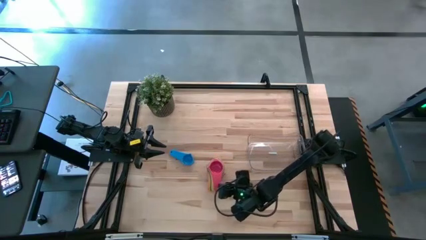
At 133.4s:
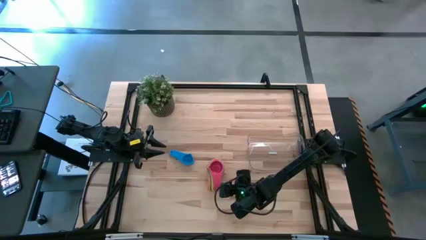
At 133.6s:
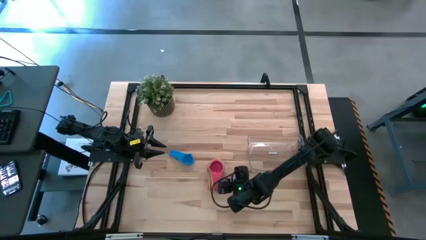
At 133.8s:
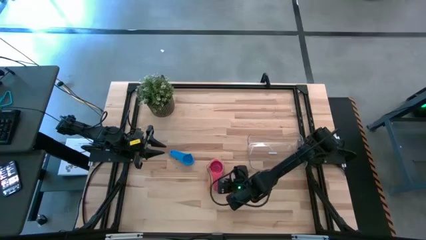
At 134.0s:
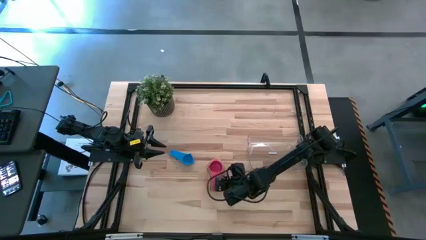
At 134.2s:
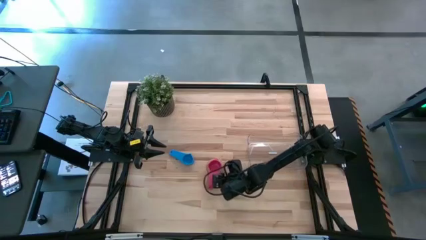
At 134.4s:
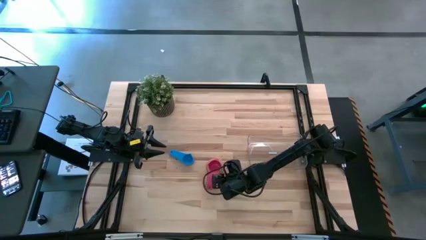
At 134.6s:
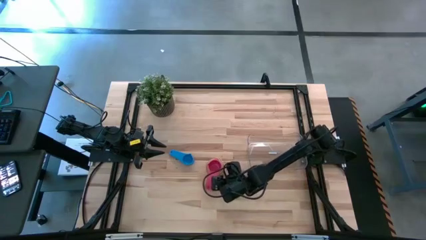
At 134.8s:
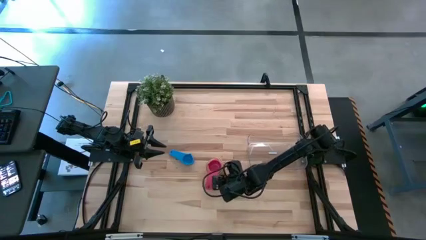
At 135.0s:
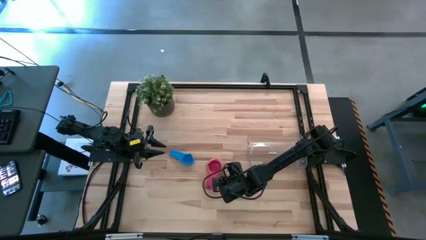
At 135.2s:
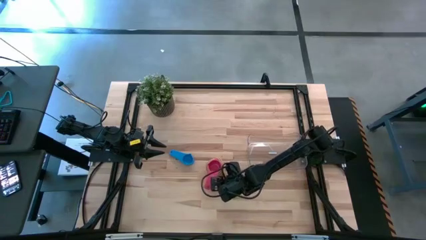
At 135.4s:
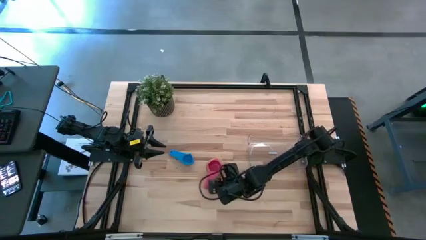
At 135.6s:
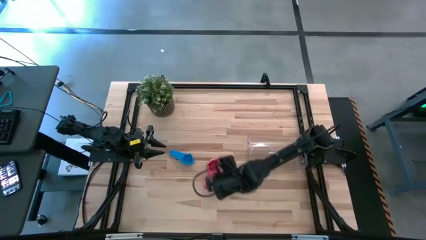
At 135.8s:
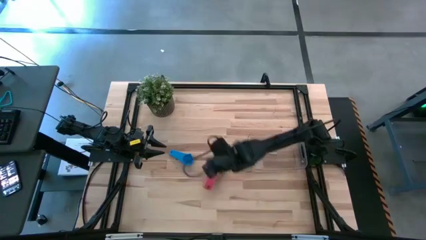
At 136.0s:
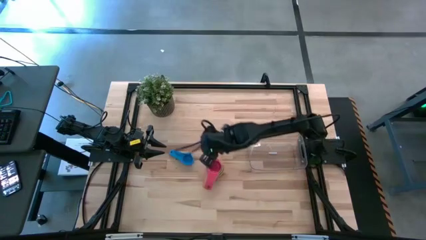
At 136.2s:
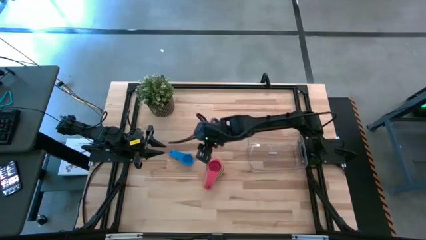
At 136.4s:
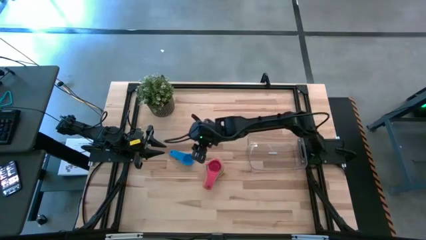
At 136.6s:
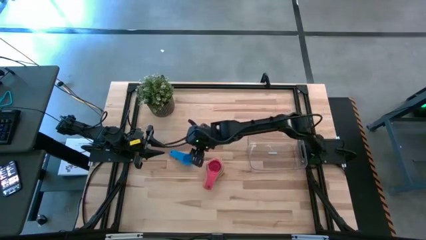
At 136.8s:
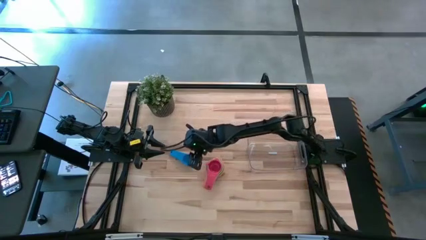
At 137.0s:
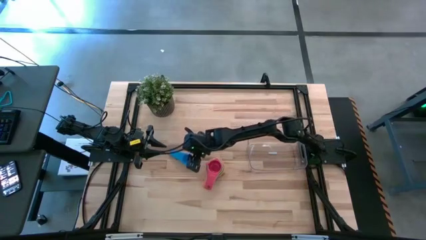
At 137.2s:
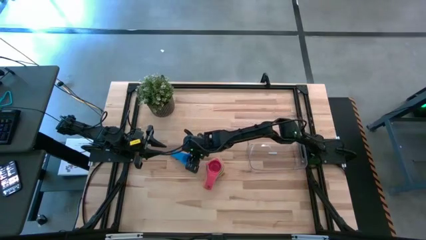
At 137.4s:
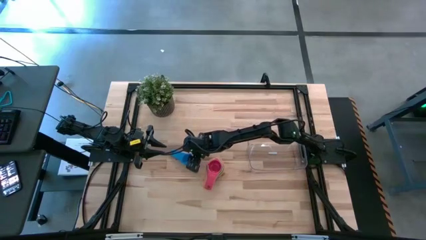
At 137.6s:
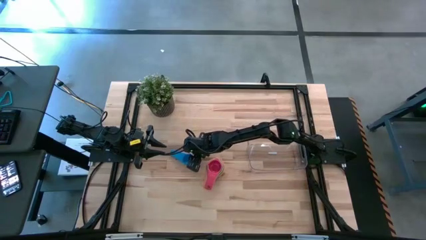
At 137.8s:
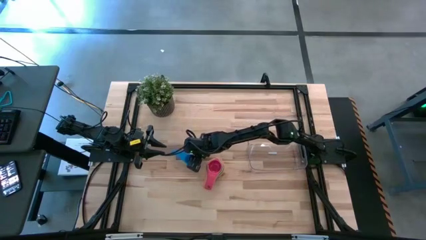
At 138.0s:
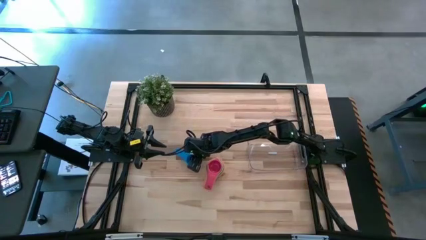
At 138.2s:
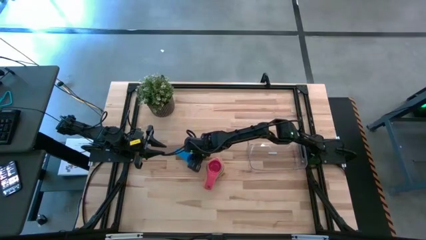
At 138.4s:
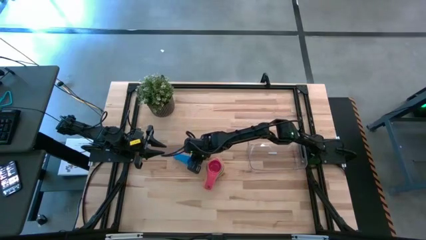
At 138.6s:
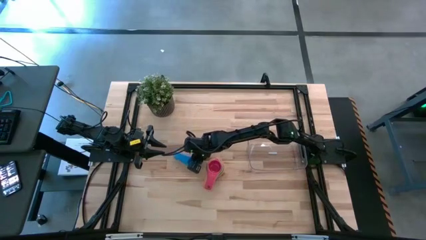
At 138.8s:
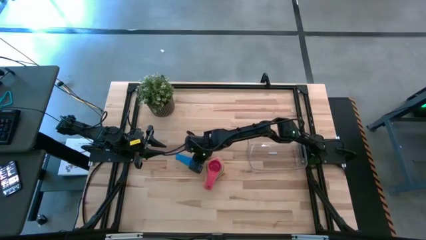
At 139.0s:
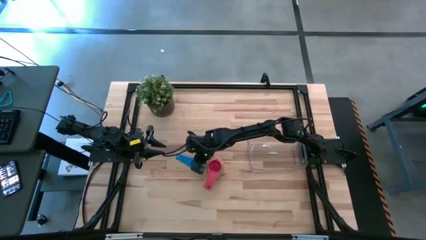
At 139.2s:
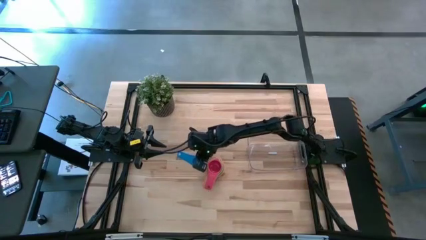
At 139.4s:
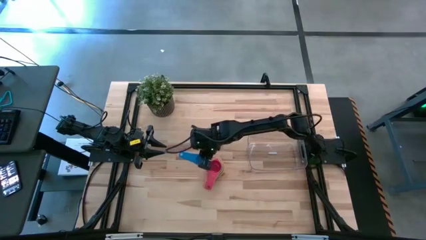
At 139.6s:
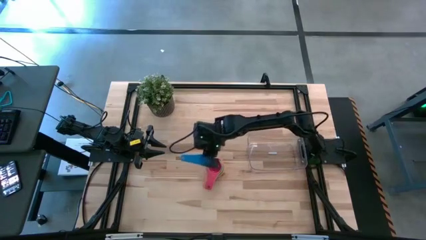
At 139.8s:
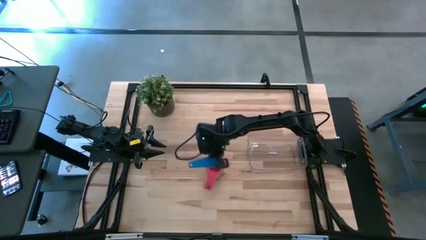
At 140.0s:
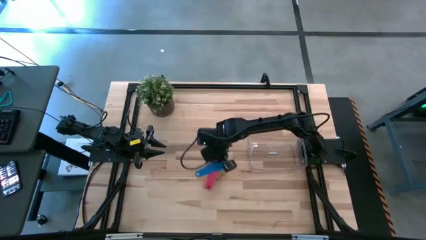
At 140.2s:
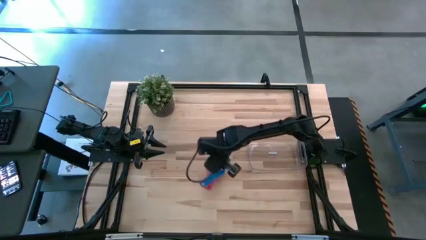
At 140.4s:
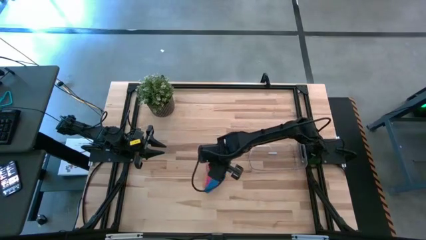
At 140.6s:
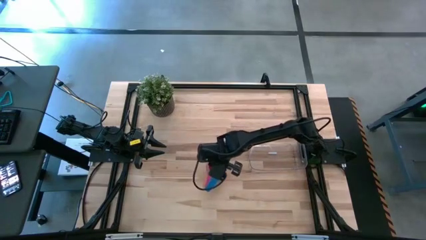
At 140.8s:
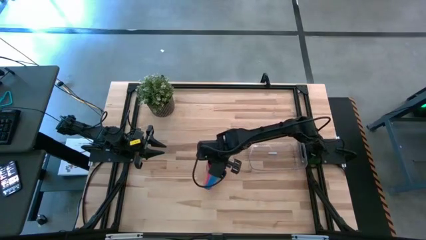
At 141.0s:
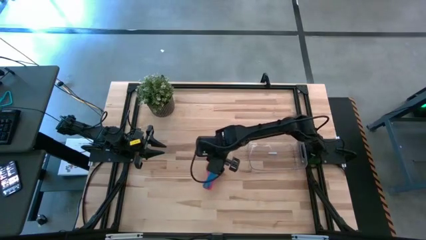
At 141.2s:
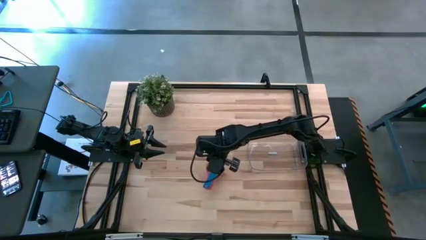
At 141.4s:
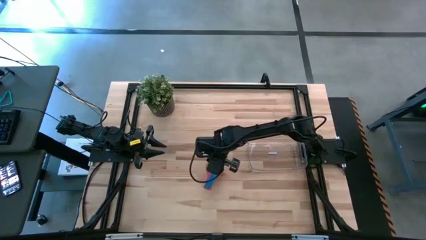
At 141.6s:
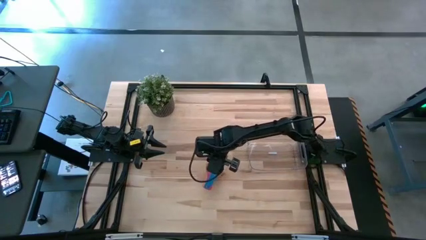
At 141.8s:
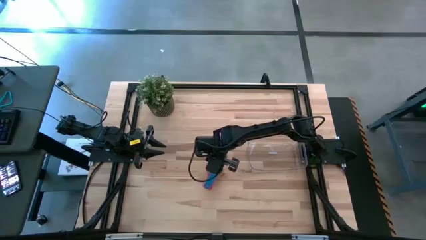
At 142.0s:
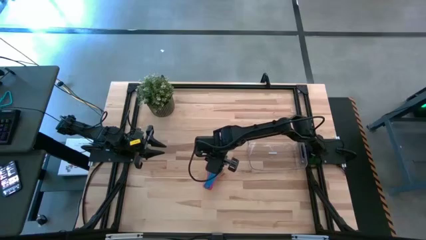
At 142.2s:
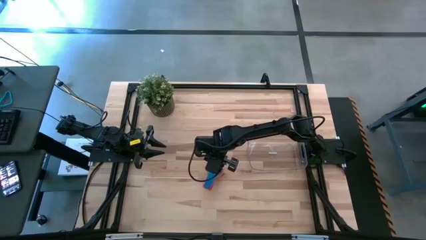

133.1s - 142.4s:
Task: Nest measuring cups in basket
Stack the dark blue measuring cup on top of the red measuring cup

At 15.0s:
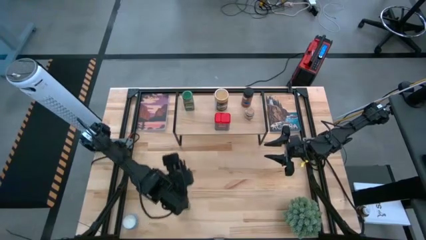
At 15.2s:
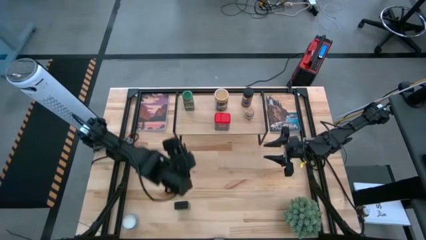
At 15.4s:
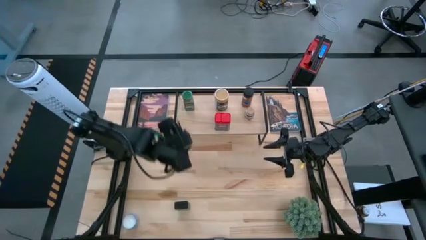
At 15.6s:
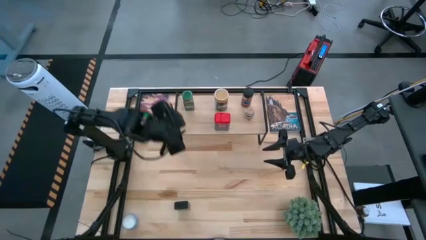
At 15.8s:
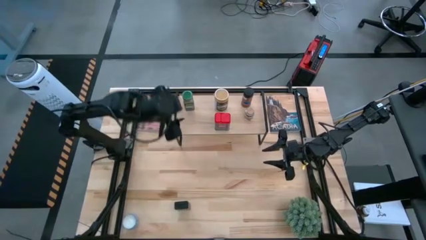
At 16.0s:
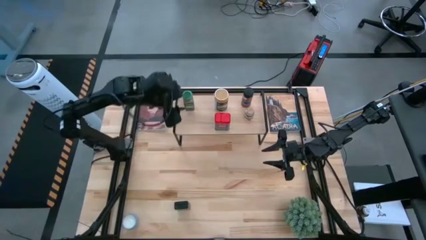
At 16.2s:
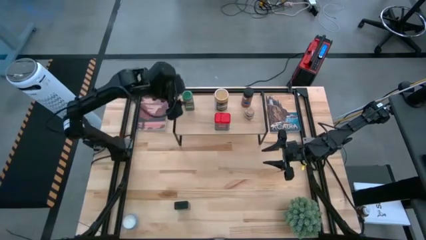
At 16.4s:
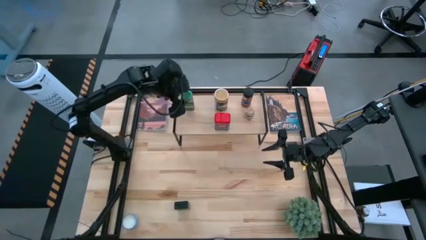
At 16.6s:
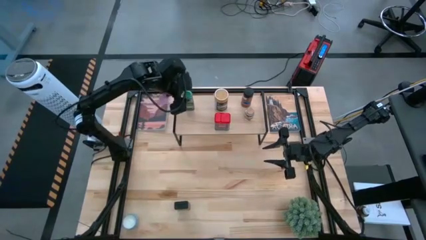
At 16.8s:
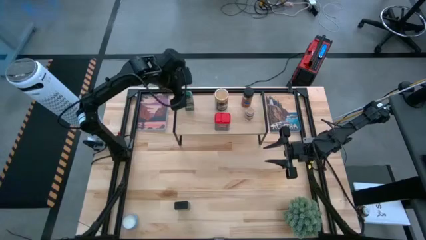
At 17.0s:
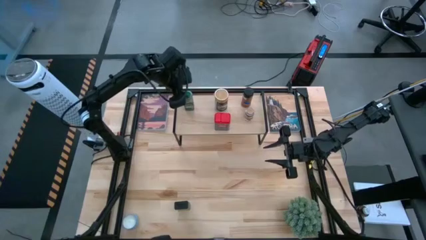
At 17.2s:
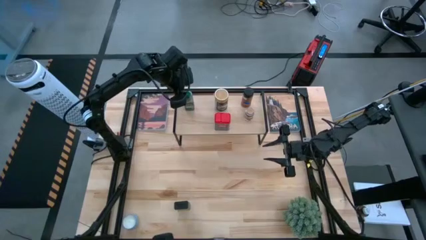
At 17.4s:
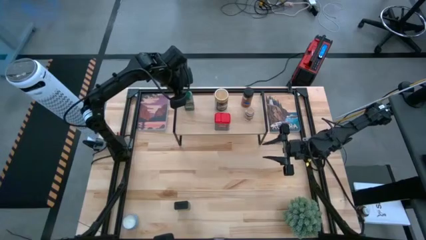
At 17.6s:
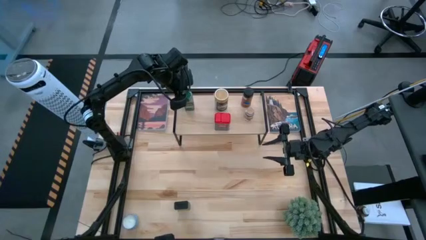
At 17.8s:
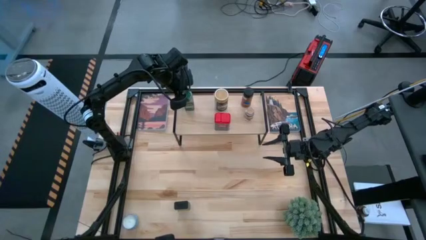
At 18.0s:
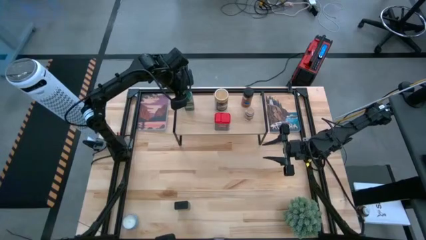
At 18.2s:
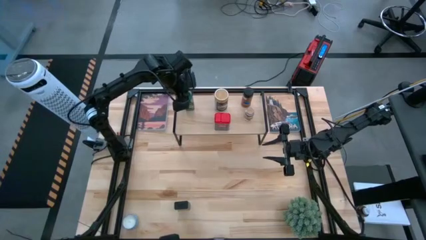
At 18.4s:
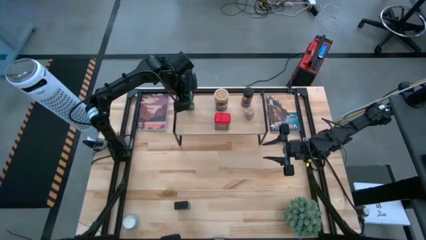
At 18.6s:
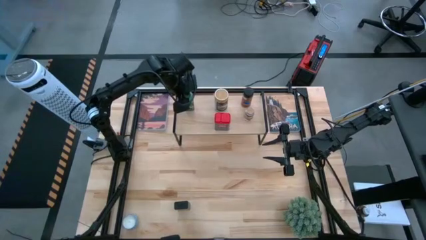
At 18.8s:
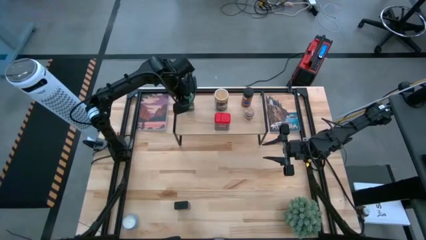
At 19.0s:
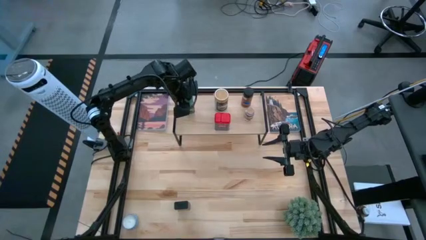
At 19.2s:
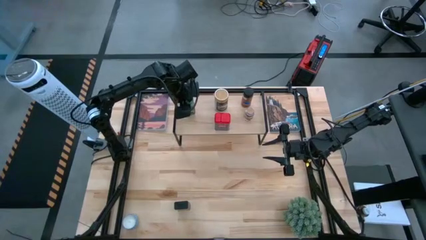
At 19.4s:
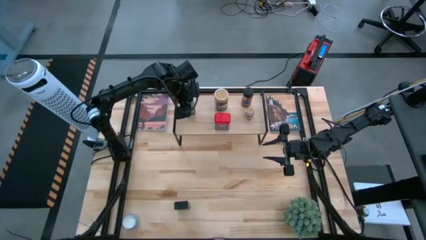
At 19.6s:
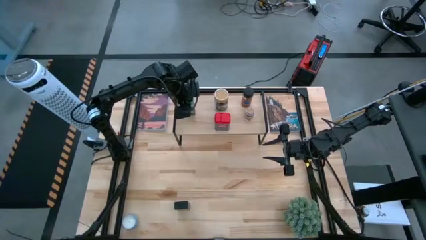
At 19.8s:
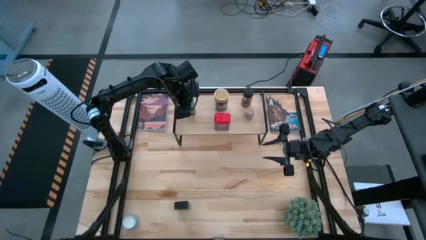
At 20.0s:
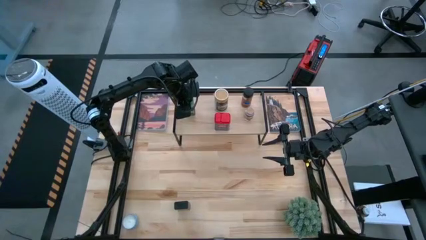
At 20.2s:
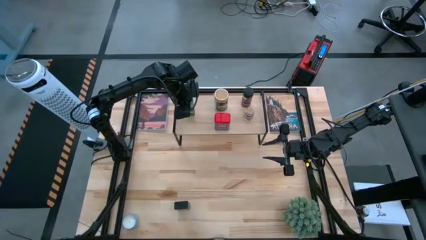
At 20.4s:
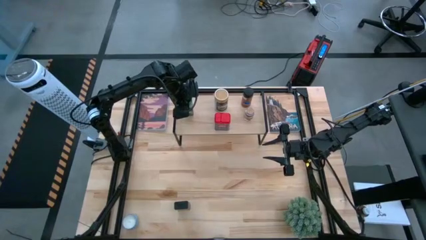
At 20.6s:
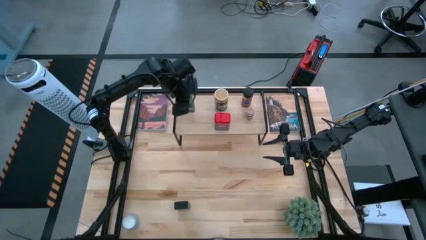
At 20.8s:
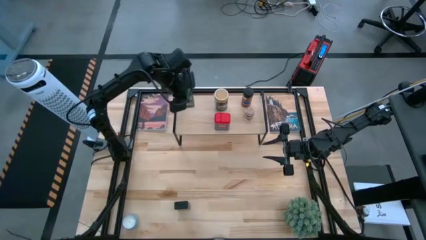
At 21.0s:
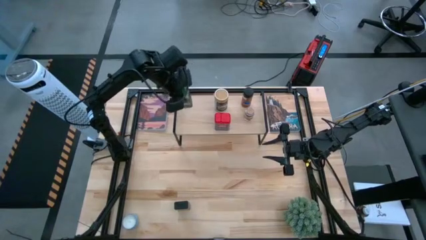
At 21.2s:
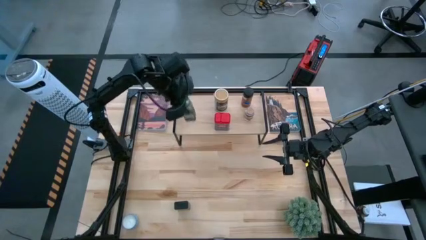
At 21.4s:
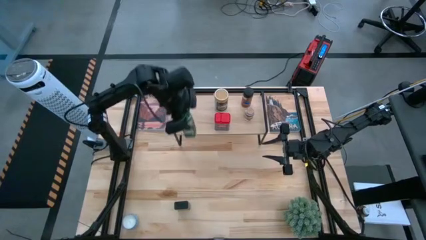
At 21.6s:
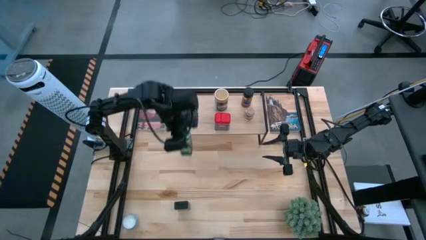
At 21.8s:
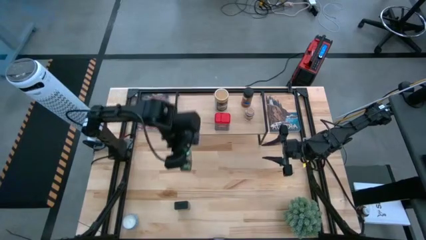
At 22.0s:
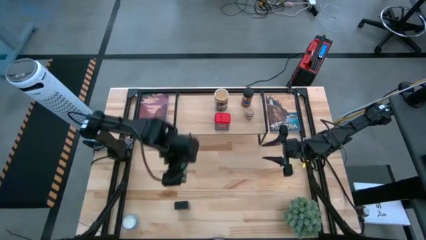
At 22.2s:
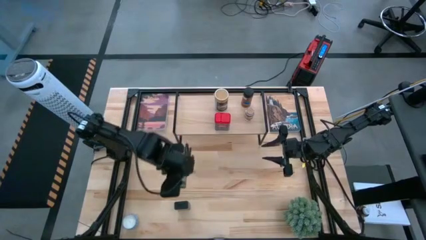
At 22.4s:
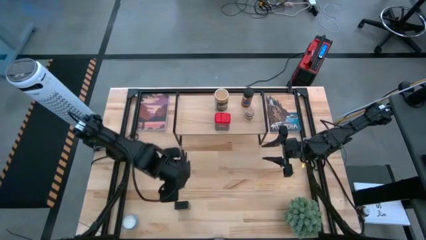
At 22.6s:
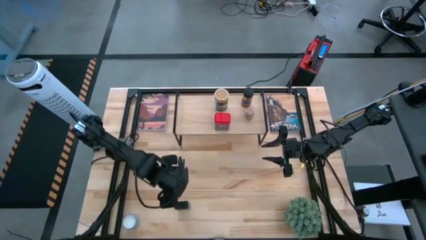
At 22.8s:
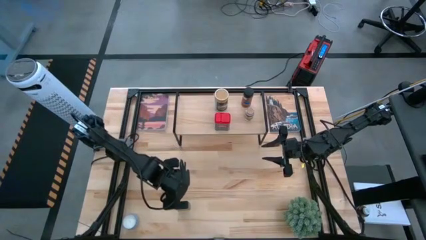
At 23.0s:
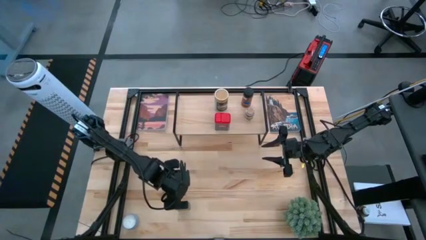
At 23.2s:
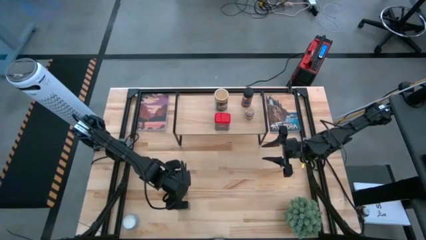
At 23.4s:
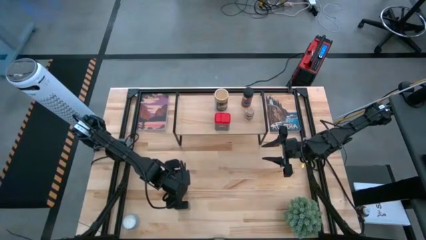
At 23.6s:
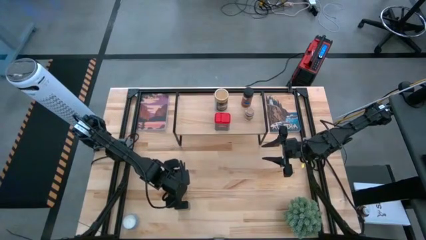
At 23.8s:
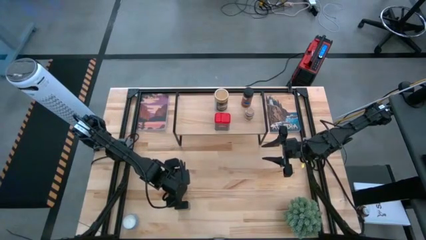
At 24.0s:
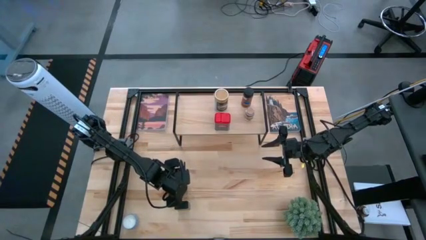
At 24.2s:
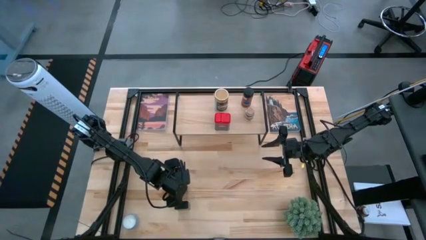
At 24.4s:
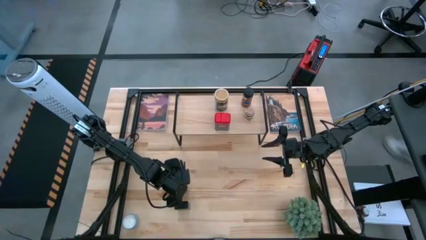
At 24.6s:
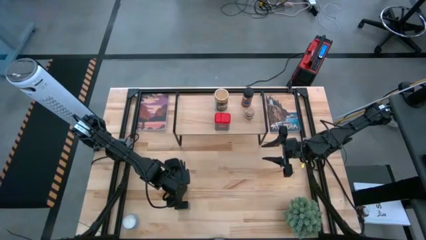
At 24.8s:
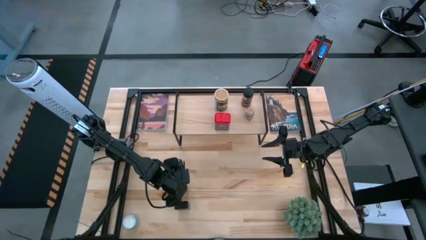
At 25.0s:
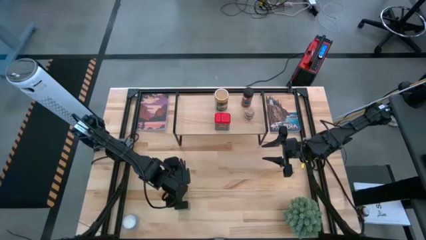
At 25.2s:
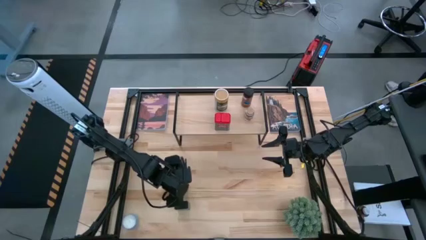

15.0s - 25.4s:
Task: Shelf spices
Remove the green seasoning bottle from the shelf
